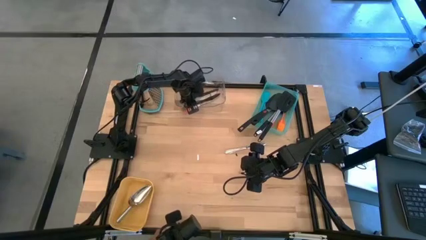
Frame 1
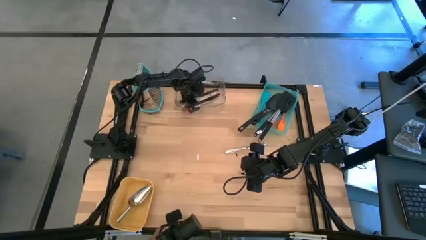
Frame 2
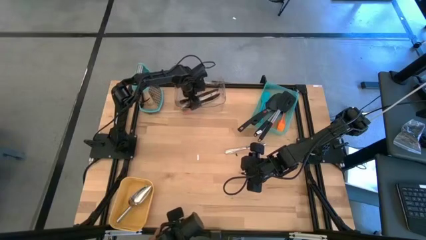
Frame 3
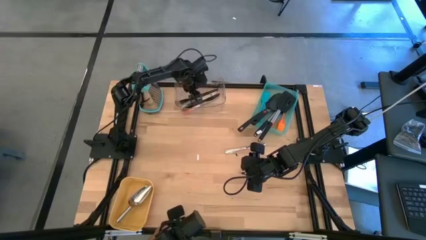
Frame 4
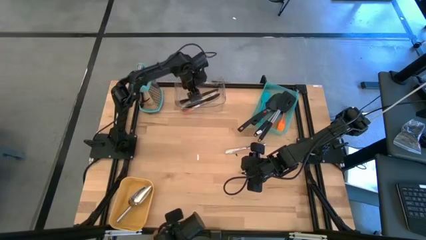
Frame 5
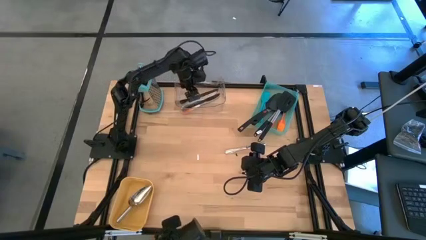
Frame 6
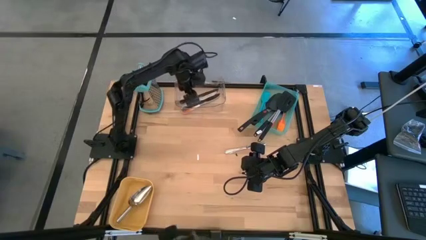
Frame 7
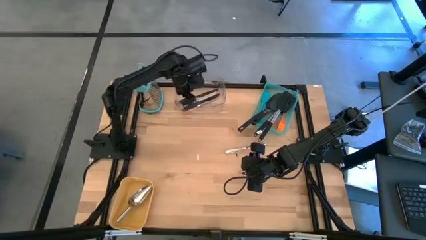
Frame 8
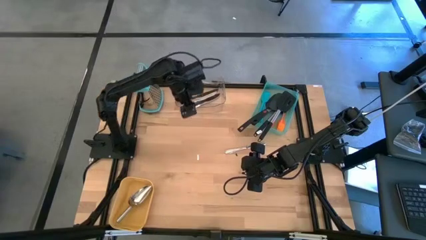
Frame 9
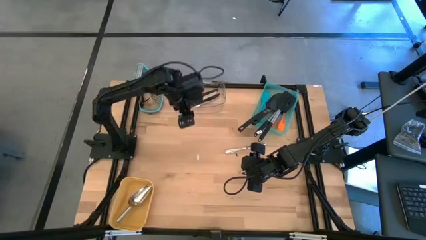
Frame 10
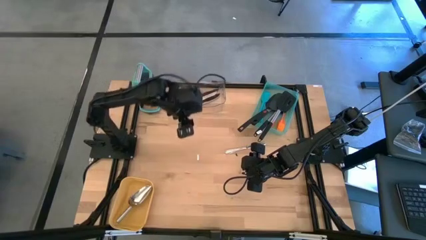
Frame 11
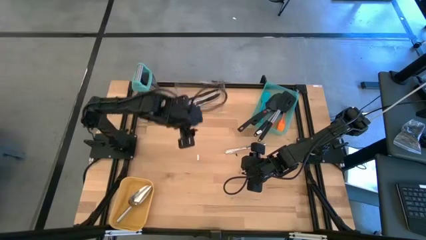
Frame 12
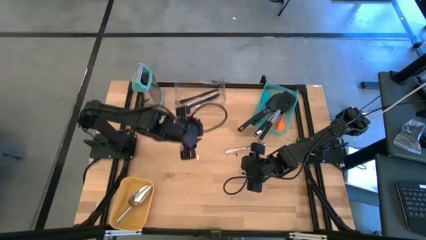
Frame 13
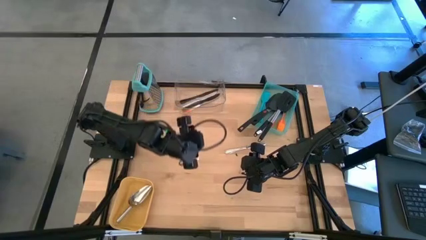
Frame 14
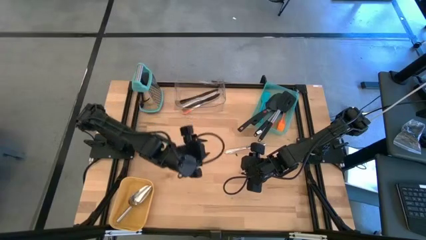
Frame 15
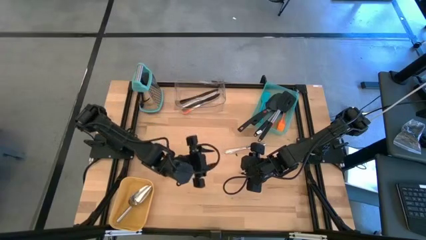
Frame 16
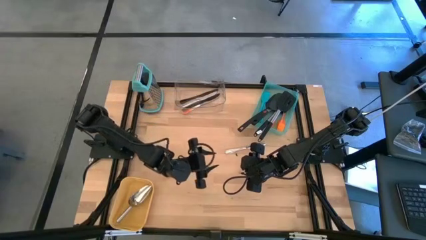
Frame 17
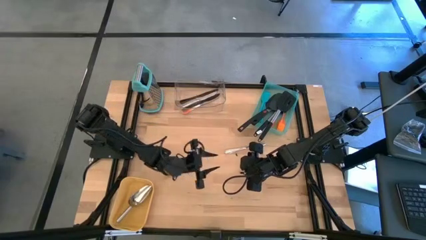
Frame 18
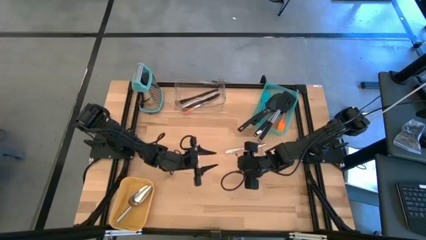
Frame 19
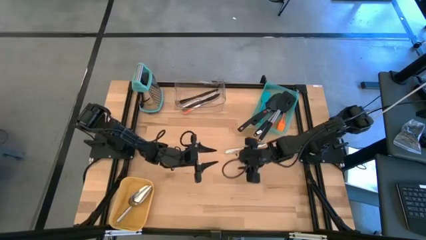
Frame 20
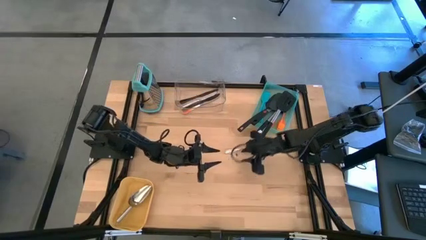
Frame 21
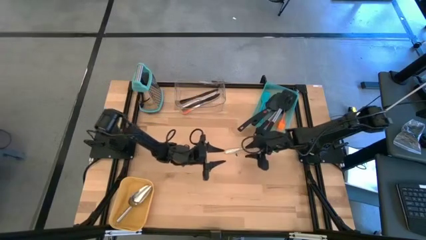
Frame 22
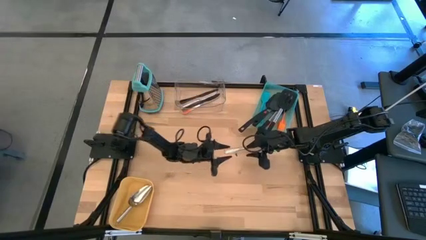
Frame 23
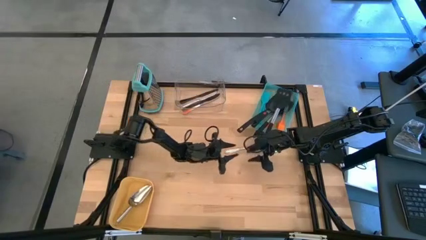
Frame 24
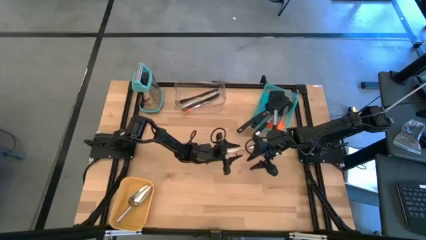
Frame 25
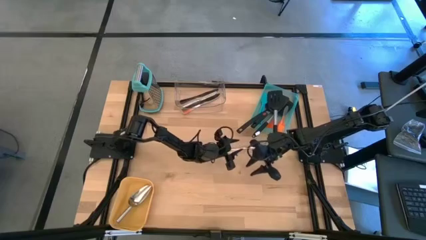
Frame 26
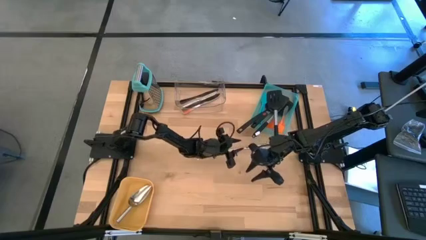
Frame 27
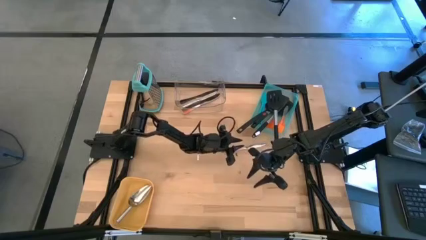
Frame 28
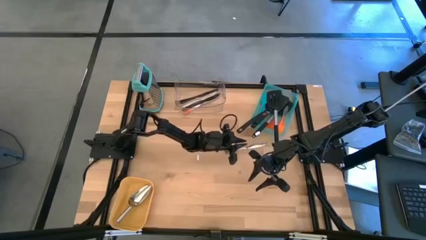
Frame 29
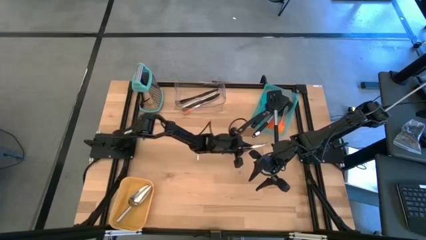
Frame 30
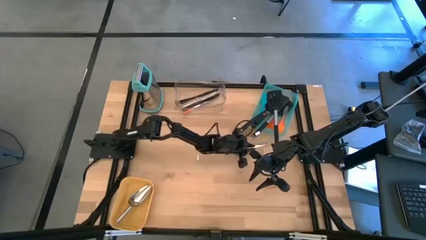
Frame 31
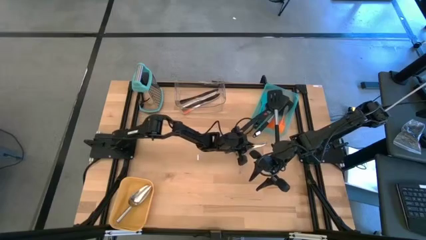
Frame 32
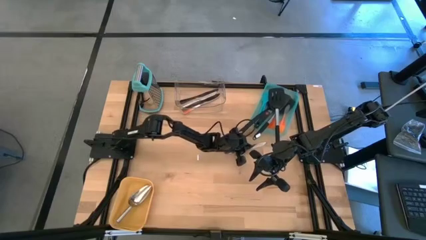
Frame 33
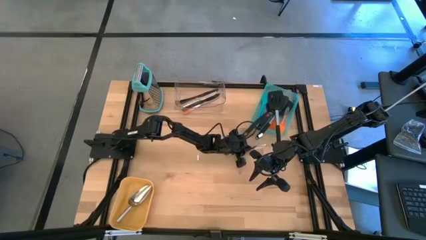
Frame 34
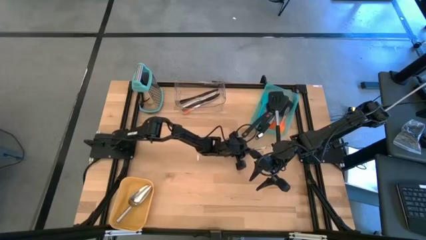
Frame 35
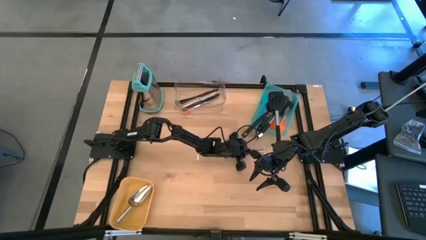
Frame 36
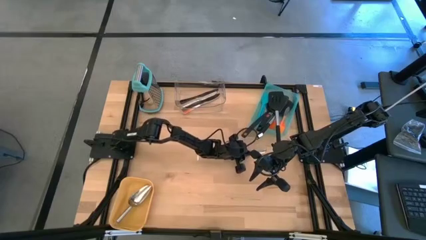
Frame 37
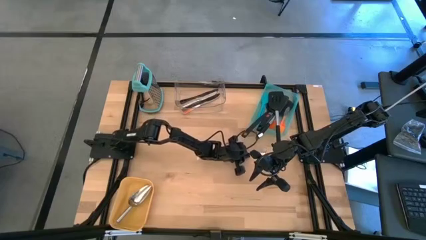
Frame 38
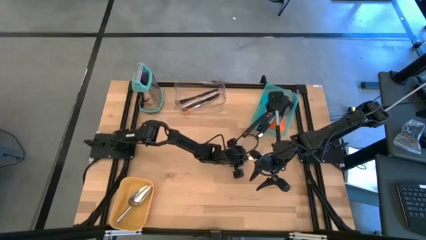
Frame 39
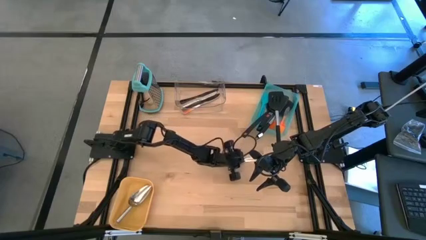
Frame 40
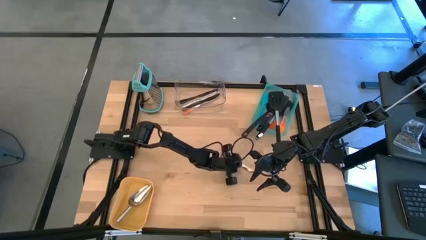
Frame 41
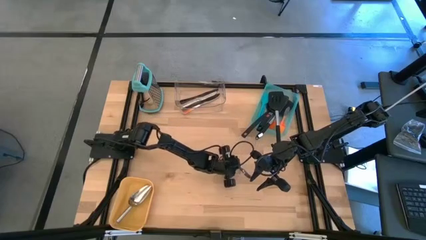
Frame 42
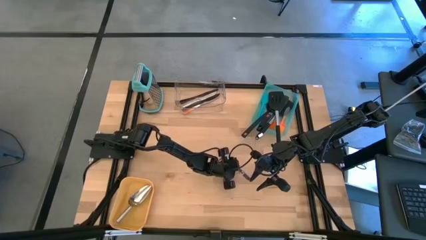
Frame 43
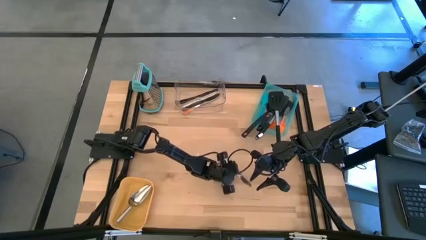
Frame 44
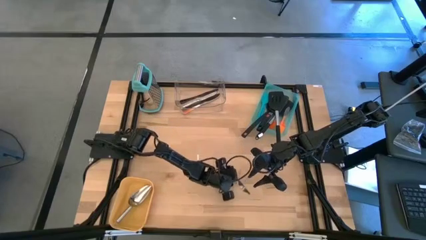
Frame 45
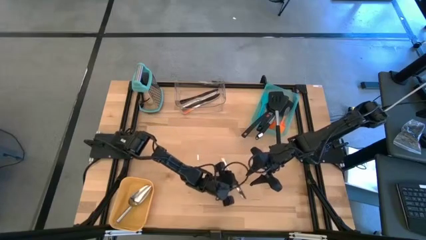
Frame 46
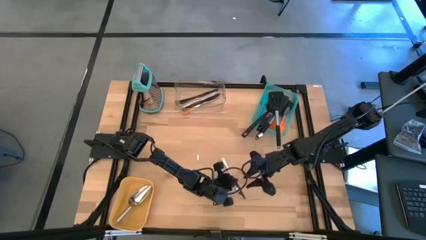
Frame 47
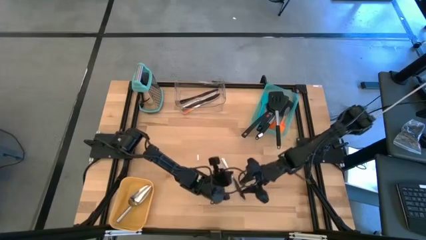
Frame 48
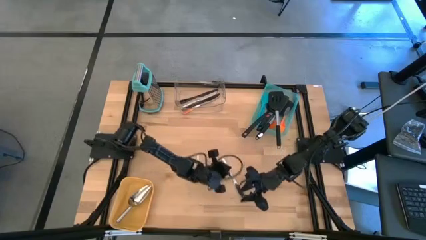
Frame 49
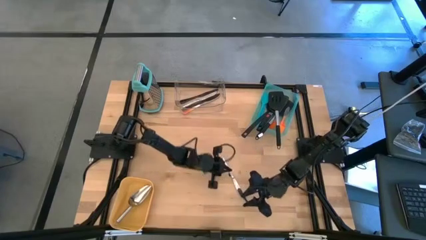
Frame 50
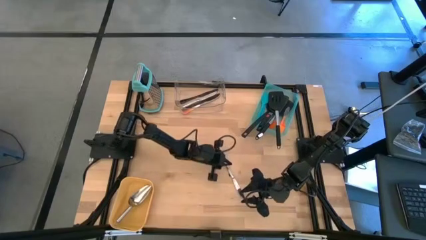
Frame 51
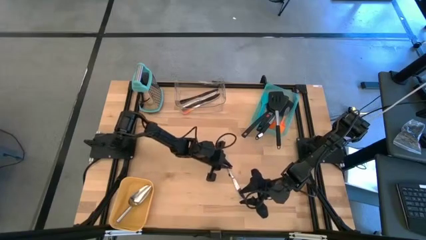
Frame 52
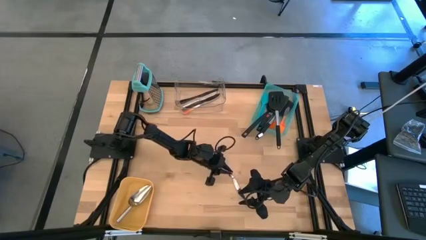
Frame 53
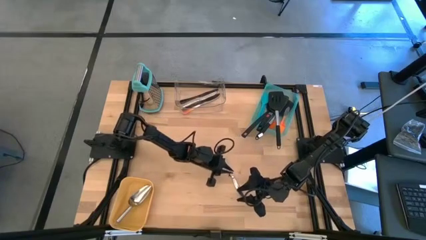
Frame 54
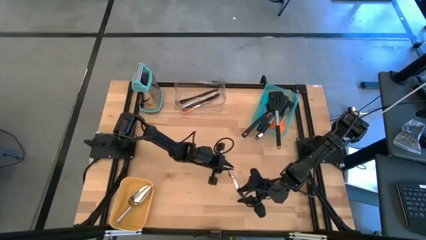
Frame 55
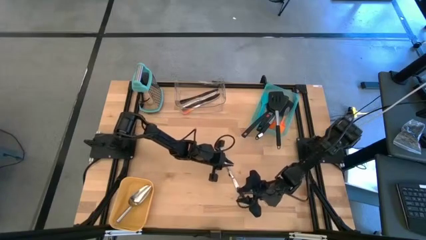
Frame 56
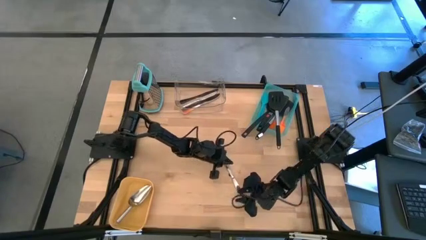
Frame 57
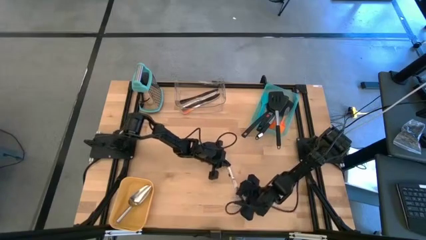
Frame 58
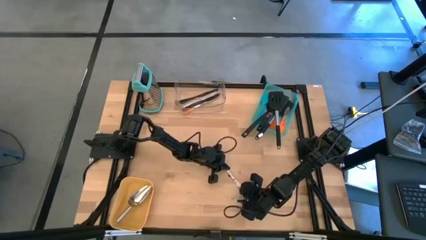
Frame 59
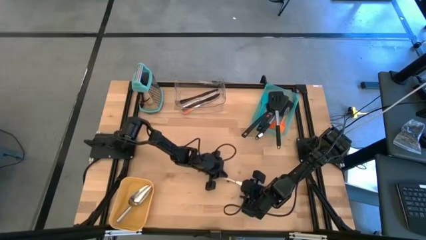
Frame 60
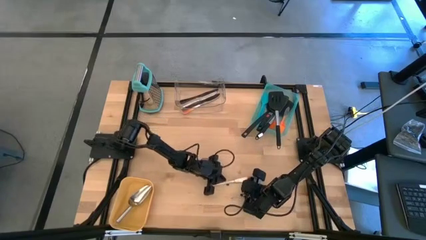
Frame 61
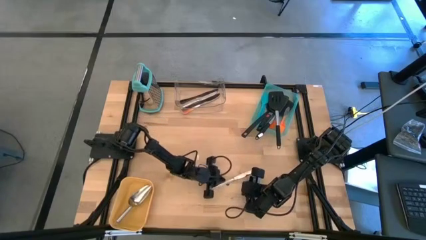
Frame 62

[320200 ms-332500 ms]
Task: Pick & Place Kitchen Items
Put the silver table knife into the transparent bin

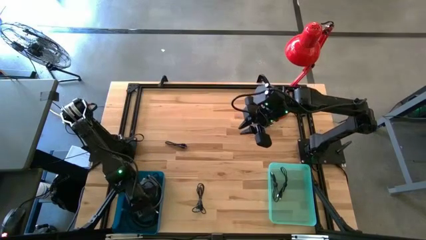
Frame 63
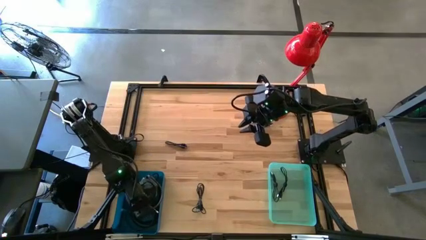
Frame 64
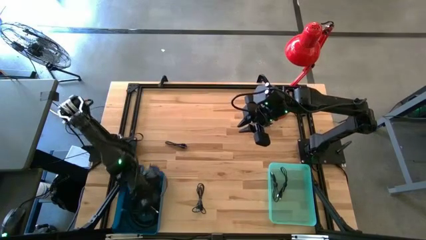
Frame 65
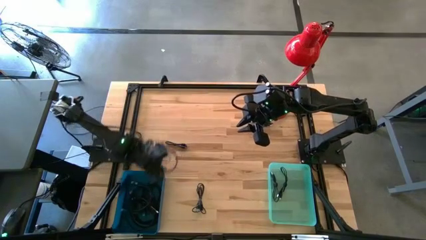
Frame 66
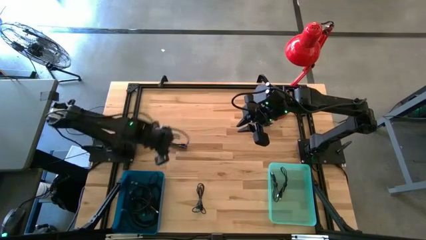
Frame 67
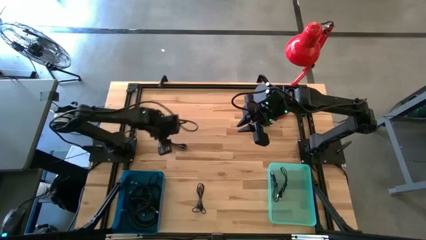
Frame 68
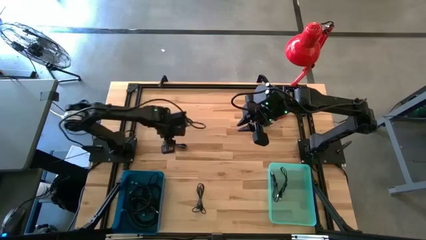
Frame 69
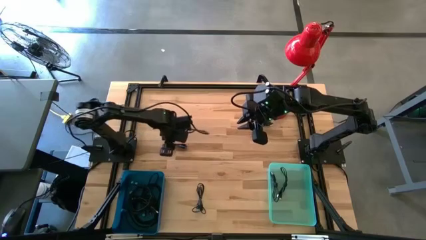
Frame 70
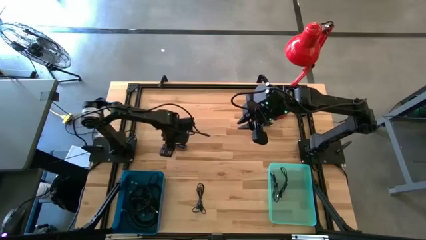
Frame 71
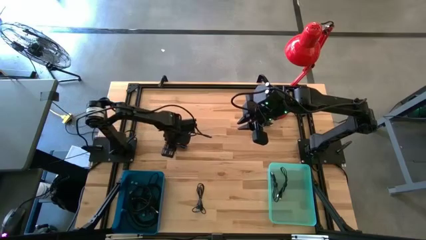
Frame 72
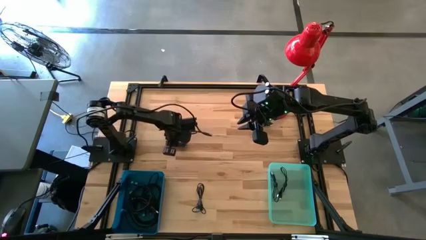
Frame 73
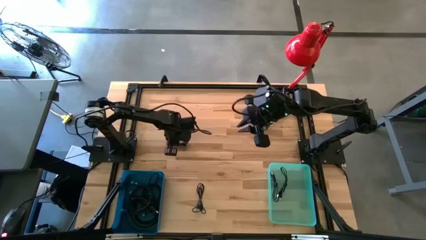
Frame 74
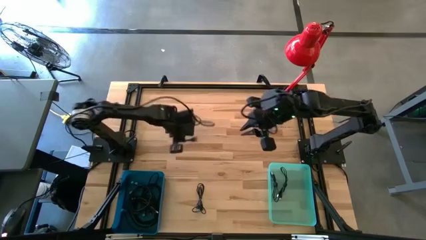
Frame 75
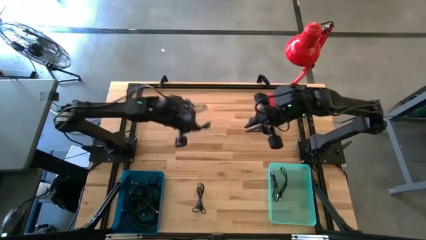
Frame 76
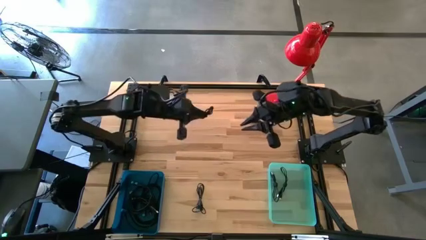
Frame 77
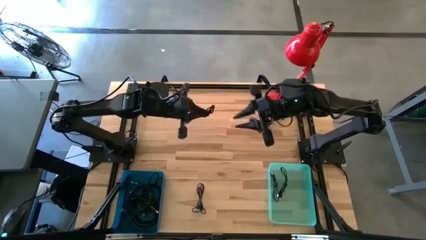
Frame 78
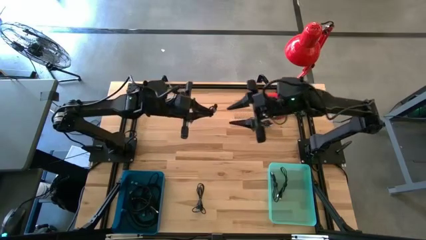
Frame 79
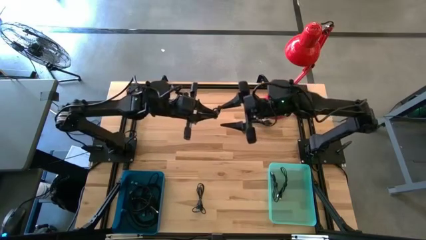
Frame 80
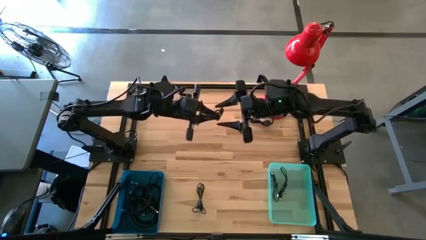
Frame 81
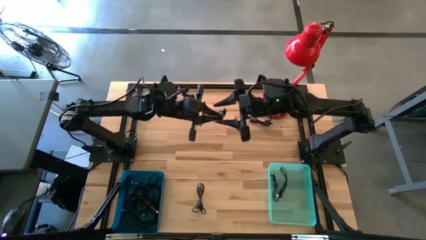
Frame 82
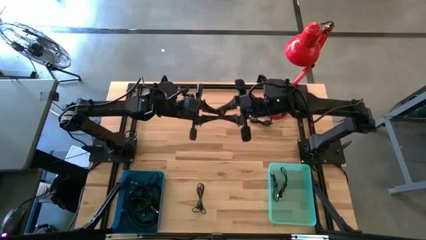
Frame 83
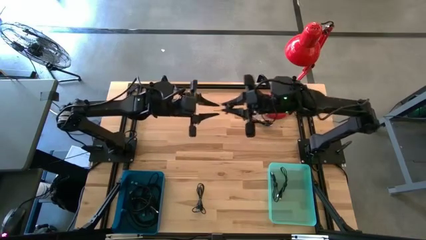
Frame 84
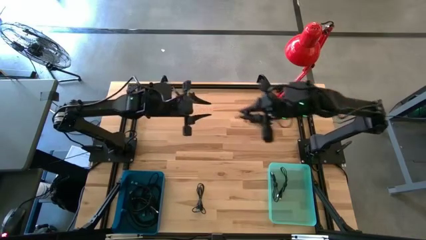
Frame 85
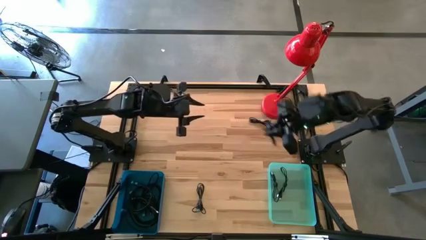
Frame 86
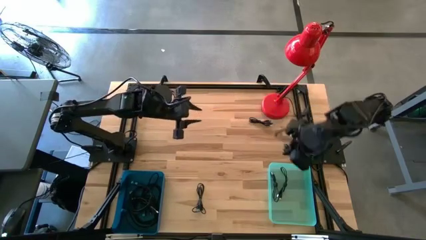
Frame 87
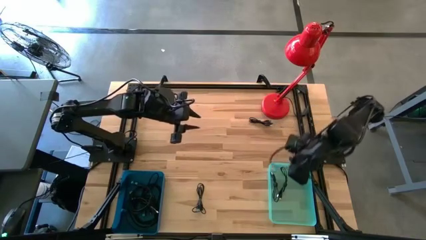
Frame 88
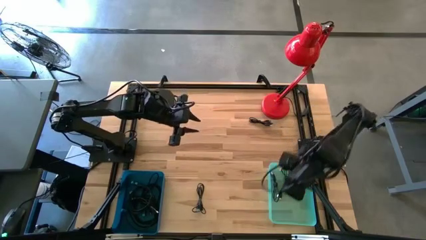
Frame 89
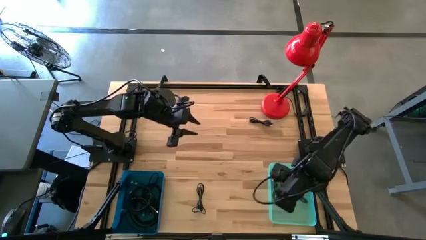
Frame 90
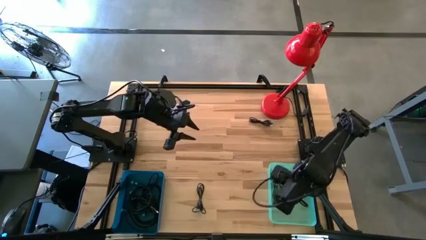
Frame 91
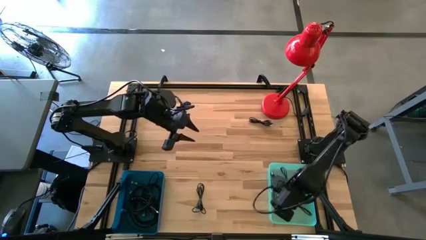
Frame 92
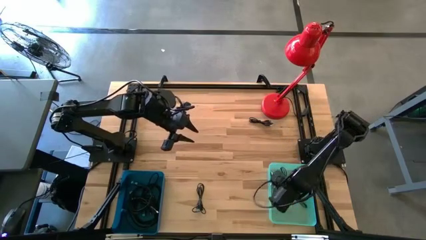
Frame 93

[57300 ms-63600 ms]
Task: Pick & Place USB Port
Put the black charger cable into the light blue bin
